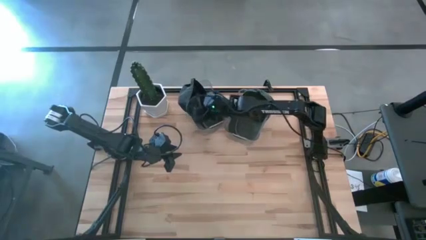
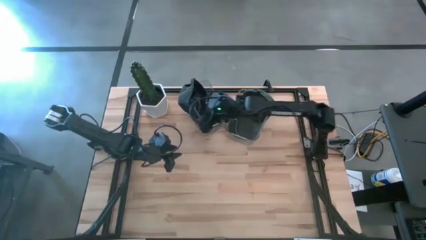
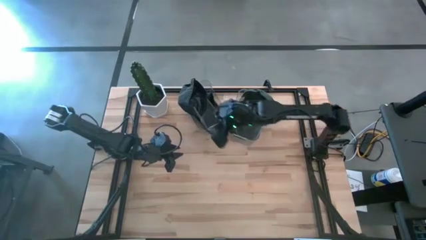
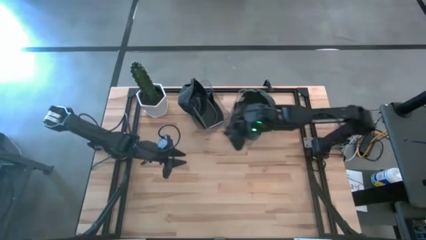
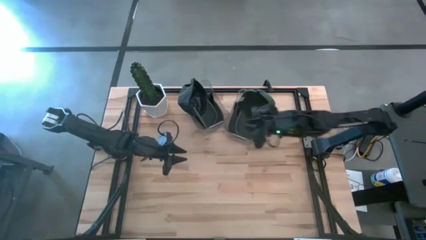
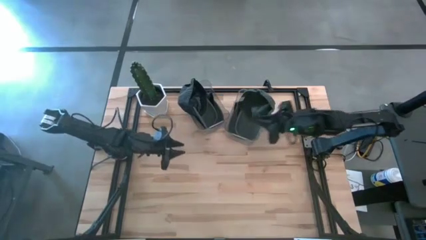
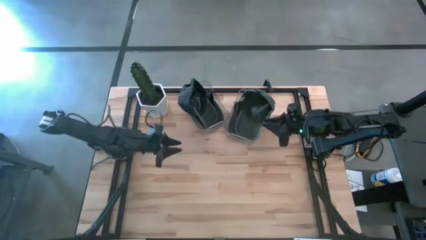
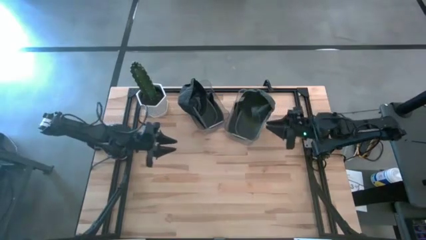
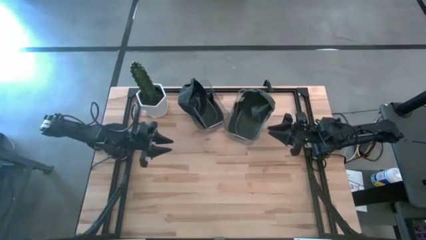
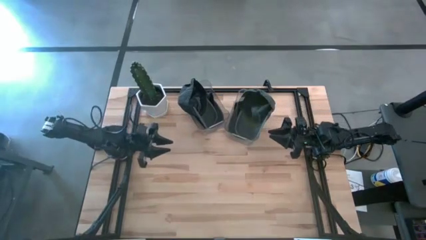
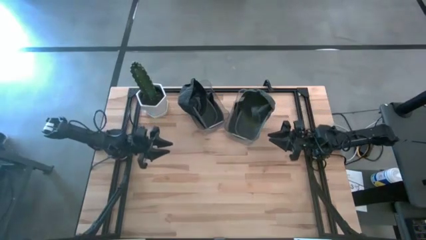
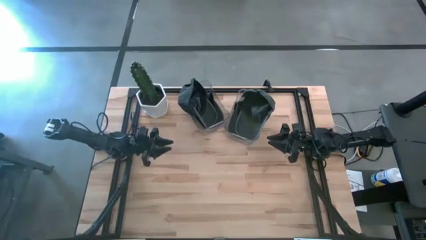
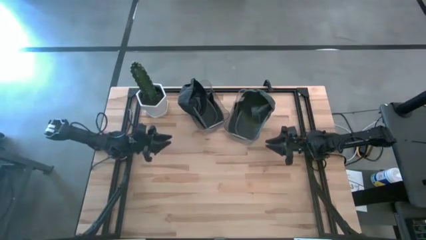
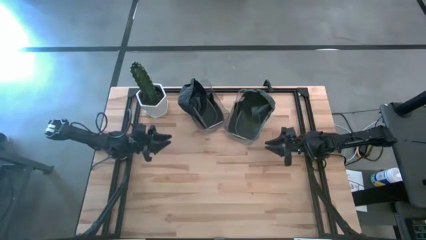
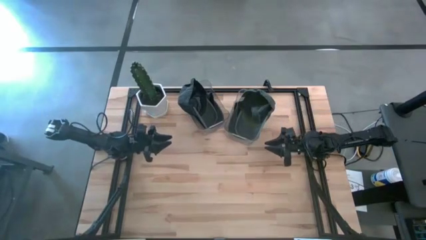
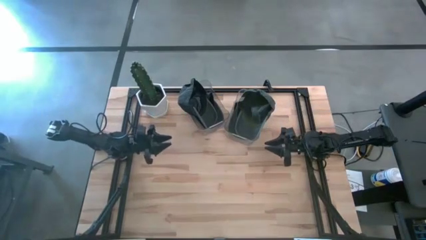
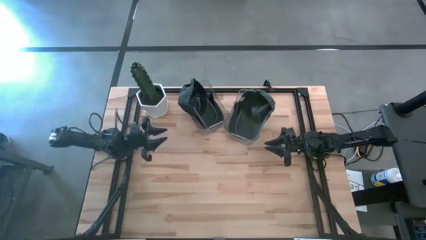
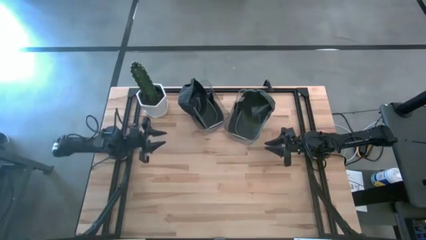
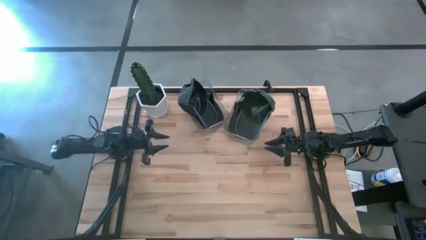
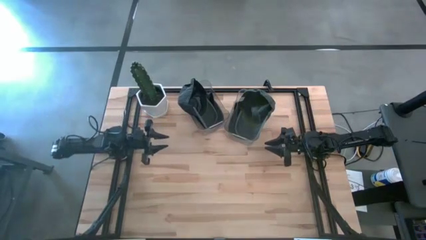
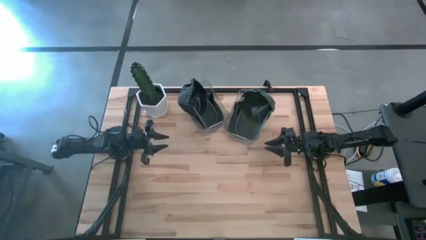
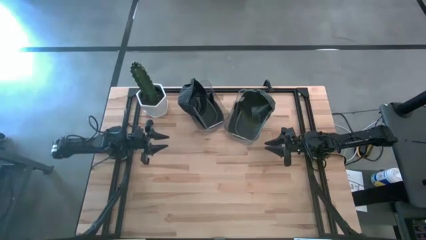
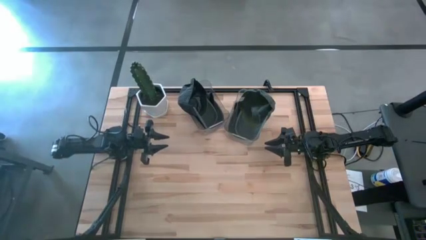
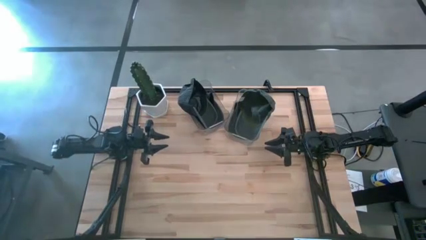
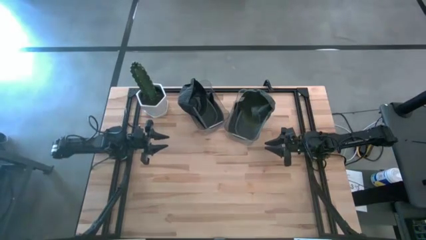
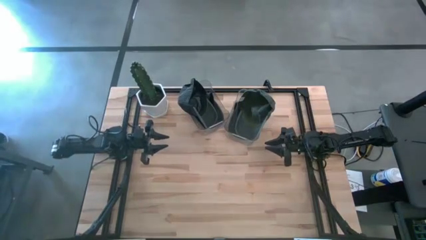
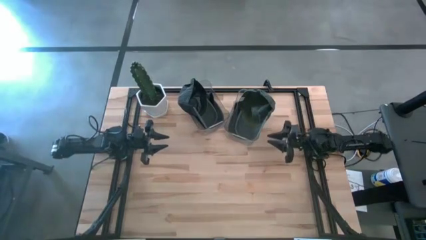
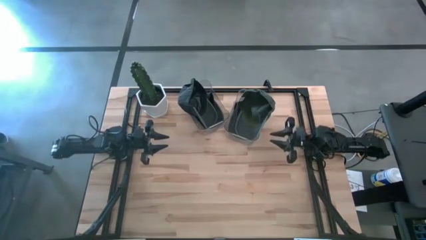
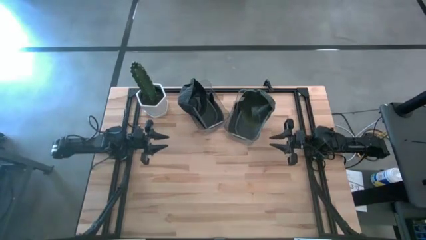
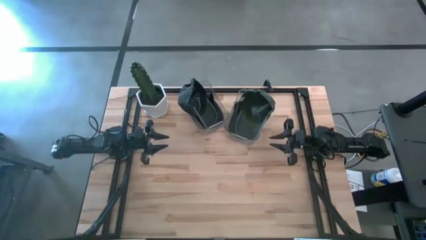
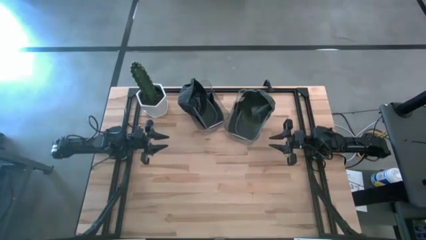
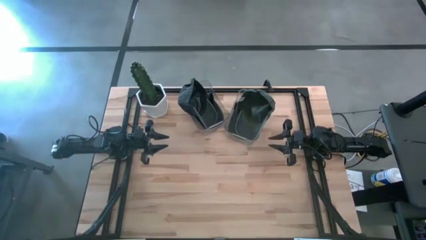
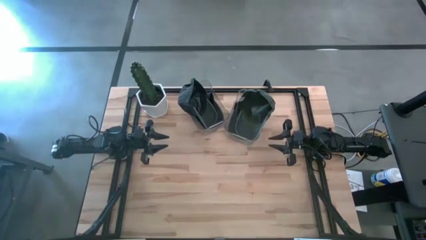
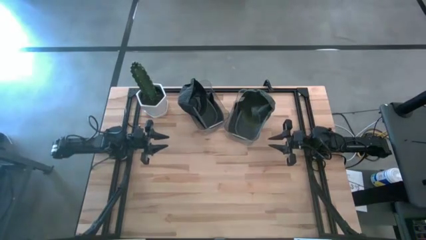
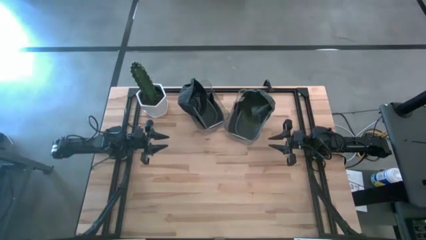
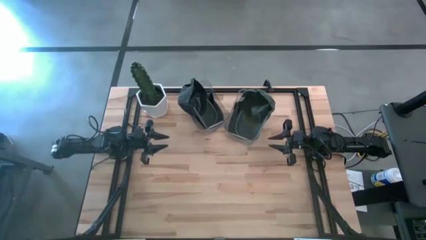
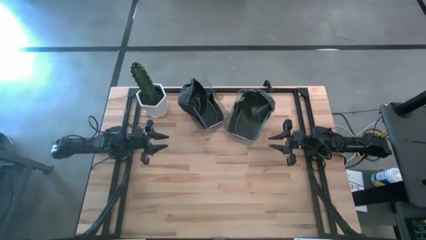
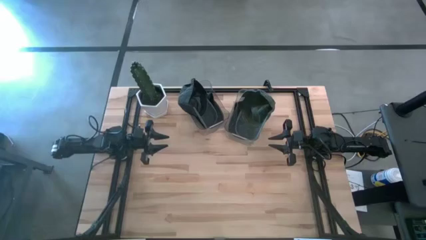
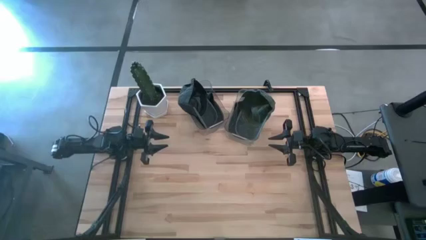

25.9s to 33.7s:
Task: Pick & Place hat
Return to Home Position

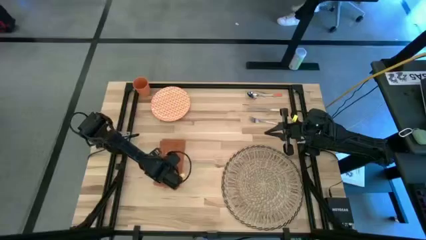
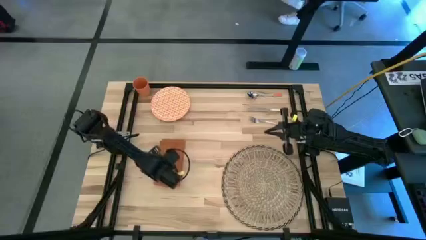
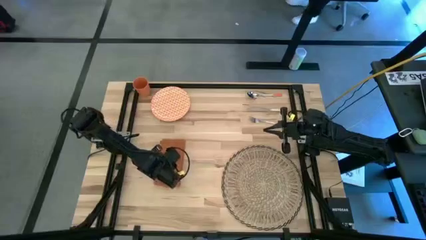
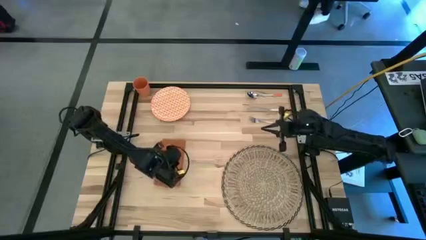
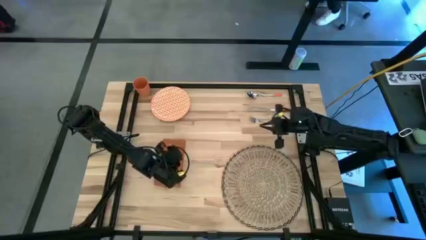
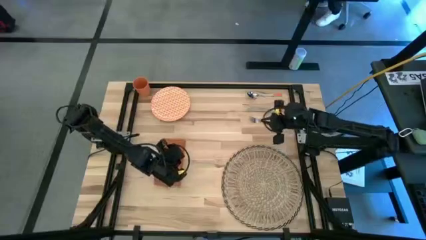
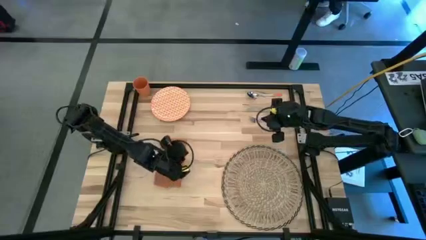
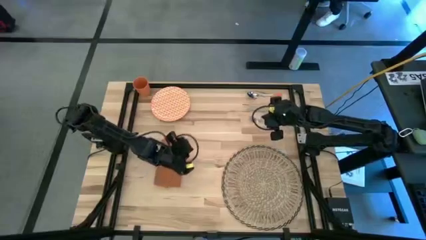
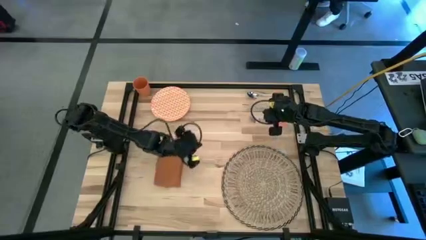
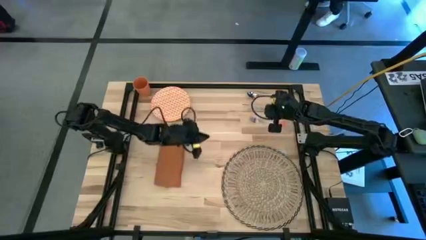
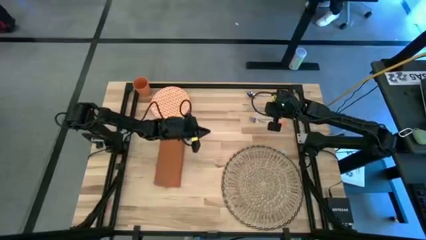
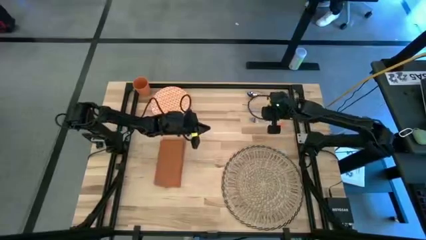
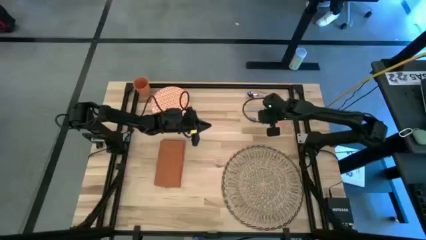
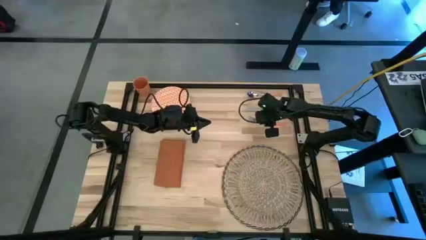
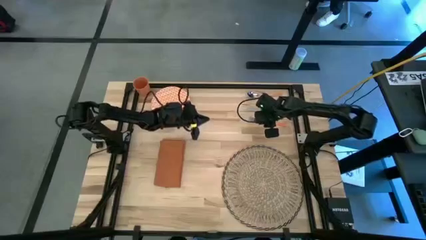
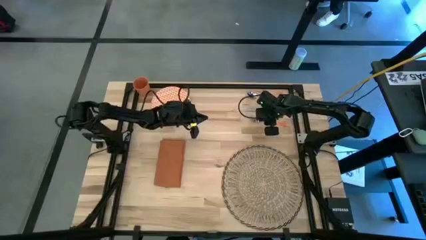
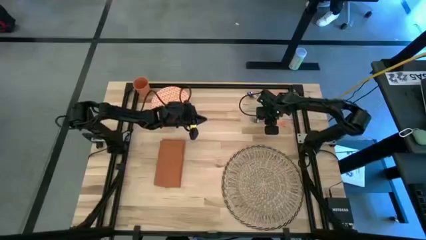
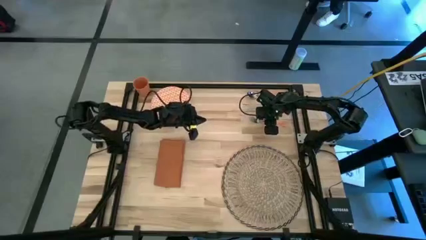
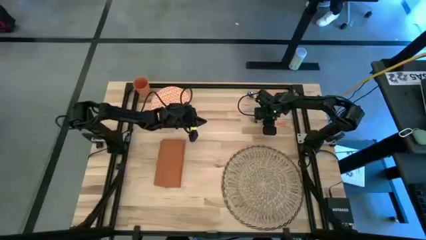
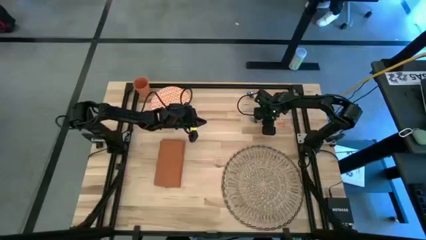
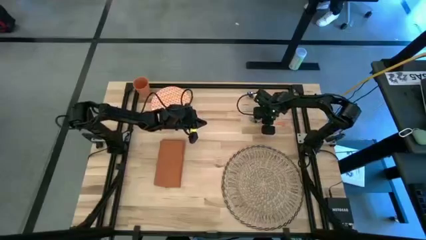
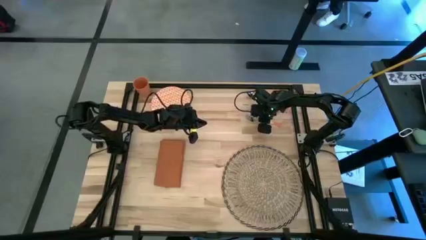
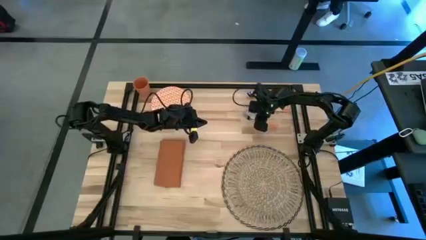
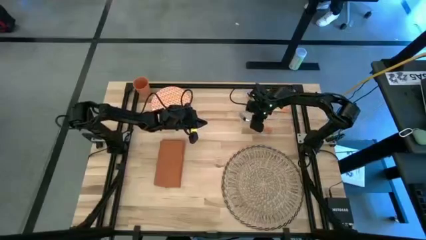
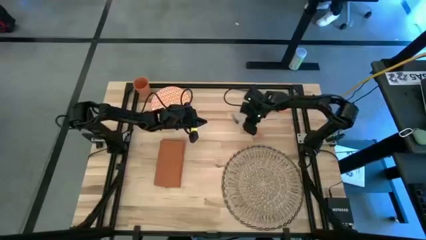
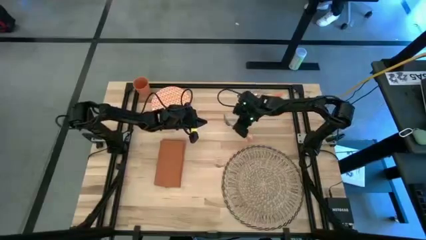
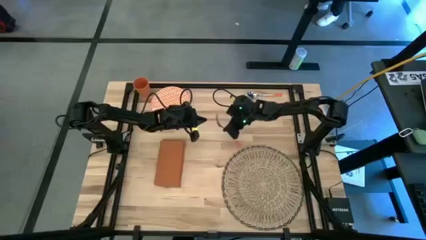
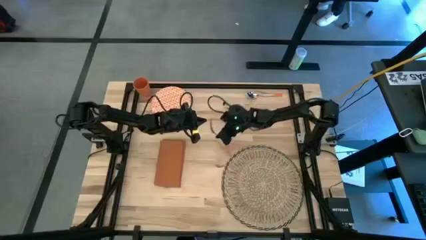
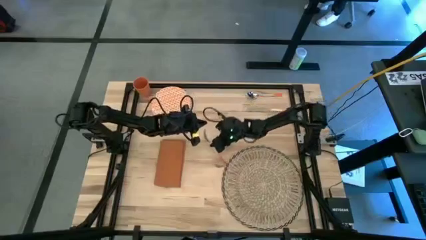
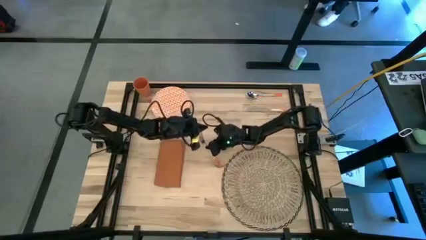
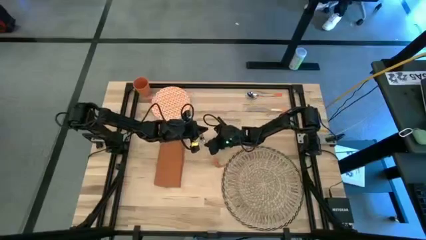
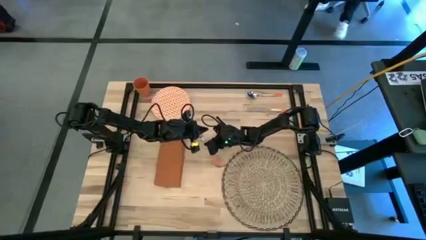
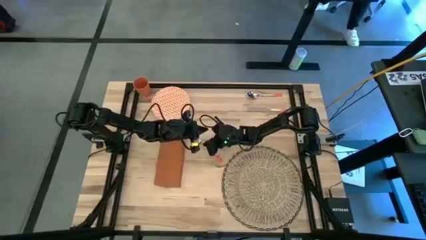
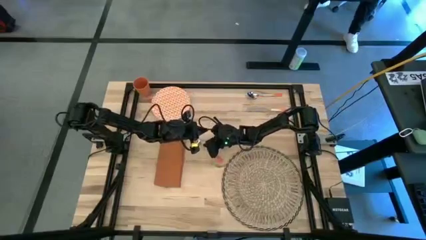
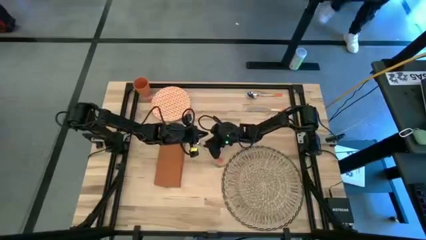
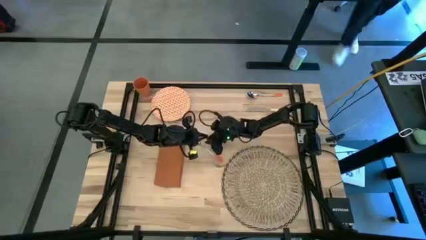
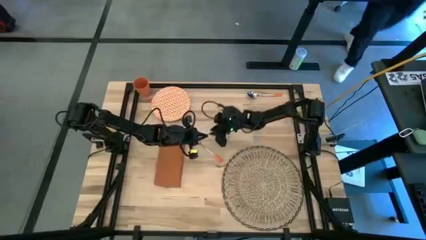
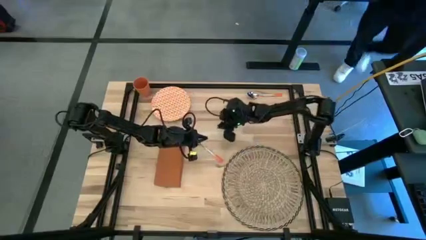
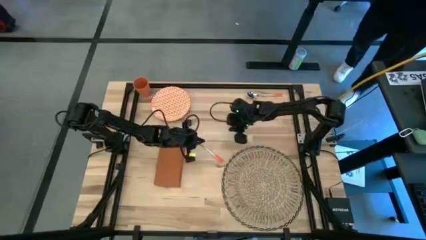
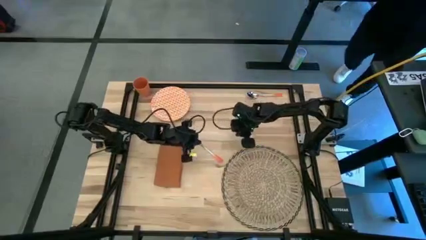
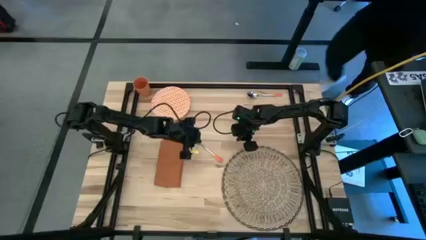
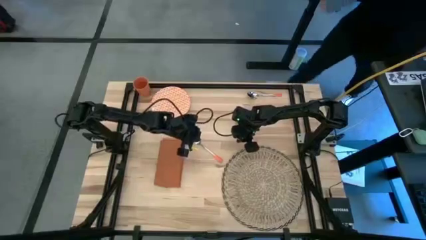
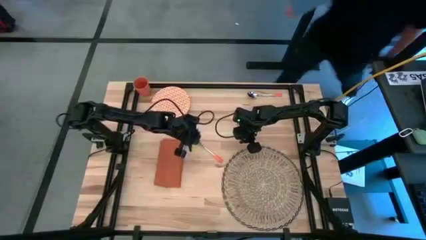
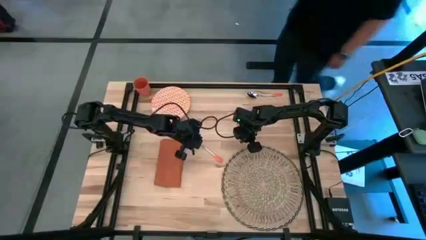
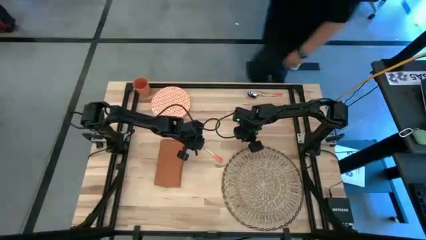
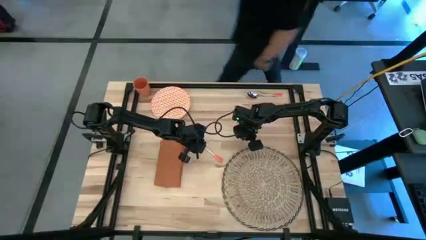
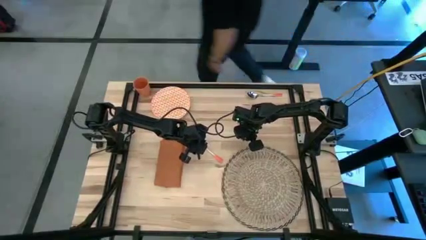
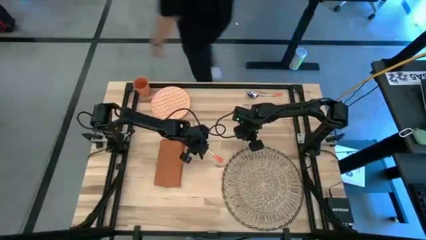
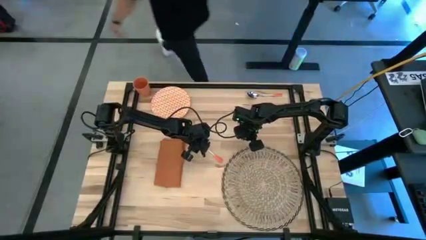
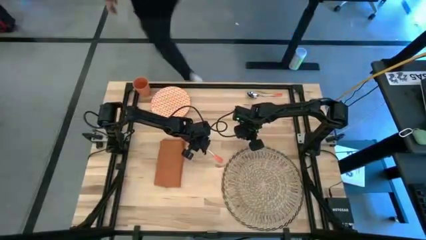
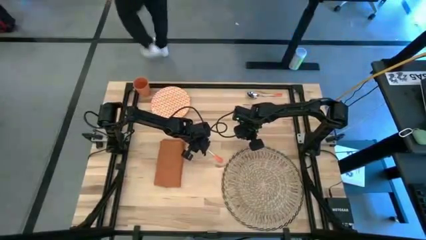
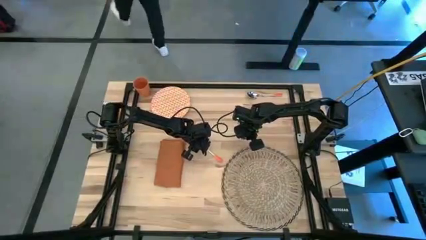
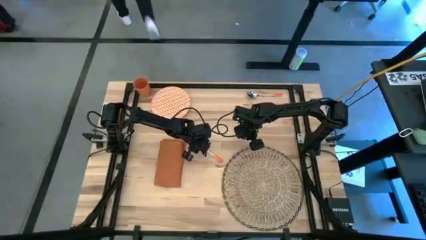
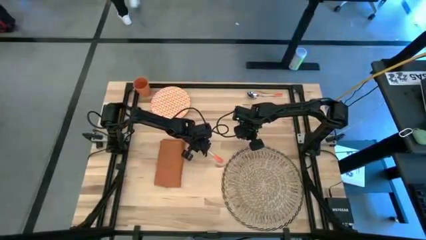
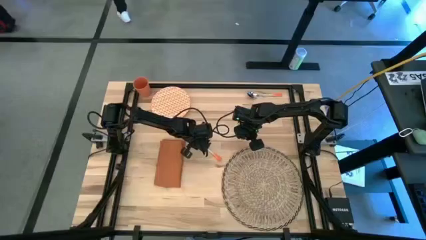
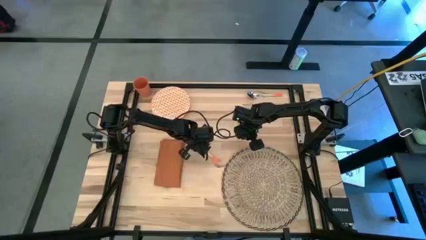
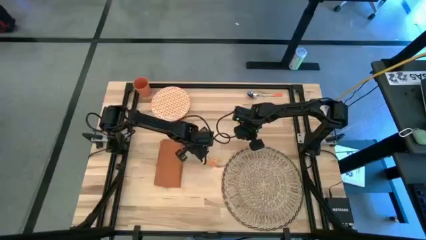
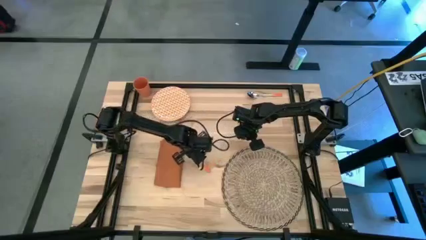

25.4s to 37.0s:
Task: Set table place
Put the orange fork on top of the orange table napkin
